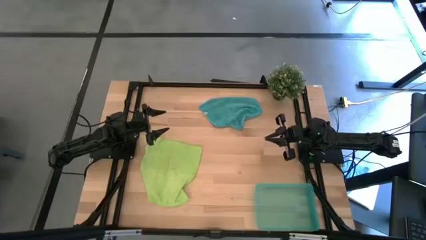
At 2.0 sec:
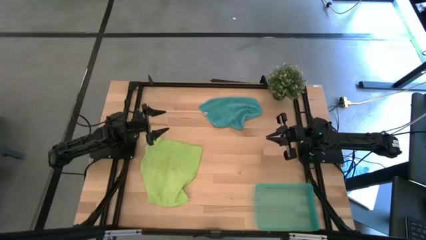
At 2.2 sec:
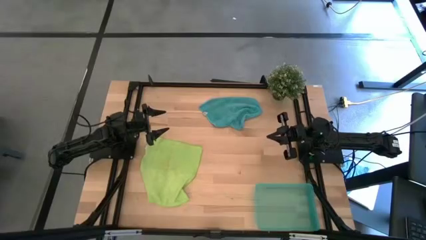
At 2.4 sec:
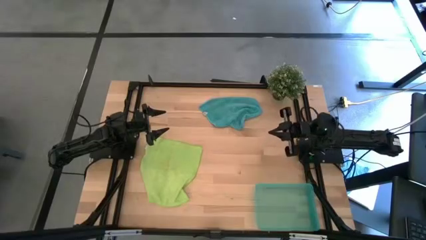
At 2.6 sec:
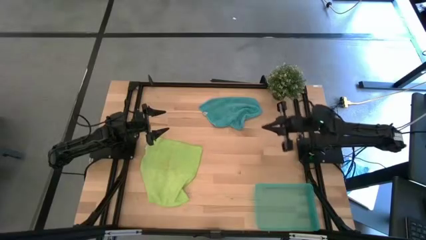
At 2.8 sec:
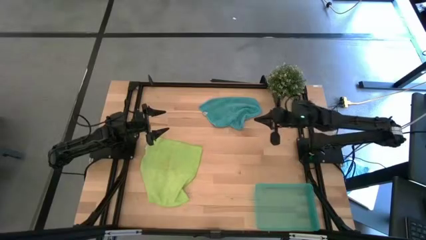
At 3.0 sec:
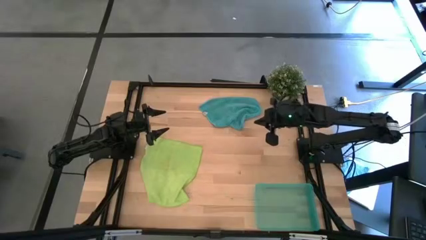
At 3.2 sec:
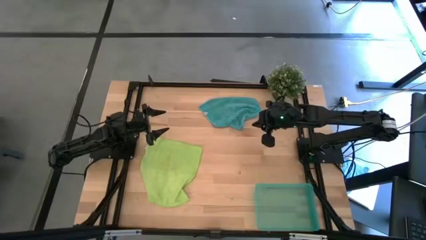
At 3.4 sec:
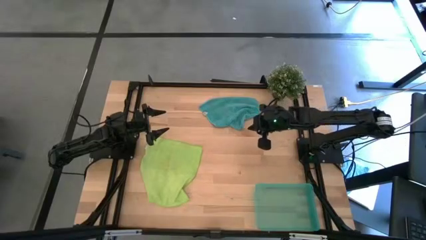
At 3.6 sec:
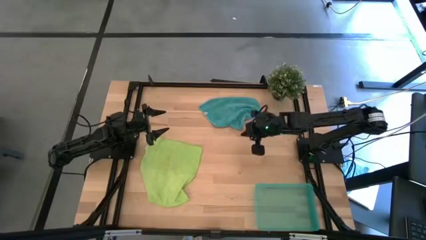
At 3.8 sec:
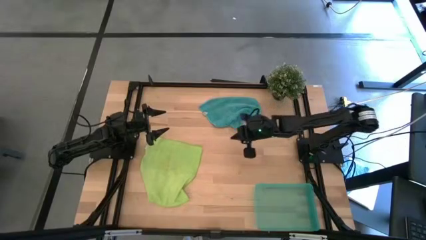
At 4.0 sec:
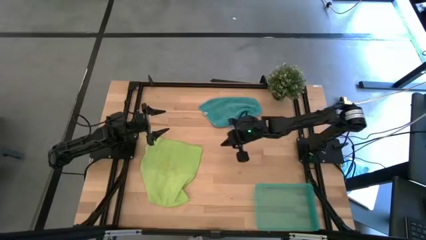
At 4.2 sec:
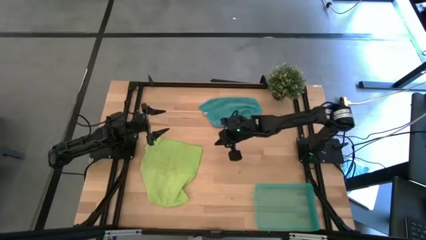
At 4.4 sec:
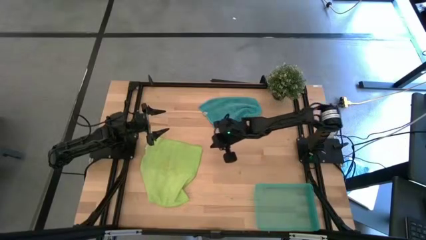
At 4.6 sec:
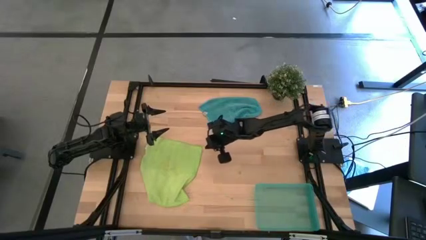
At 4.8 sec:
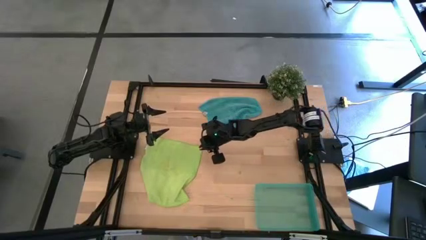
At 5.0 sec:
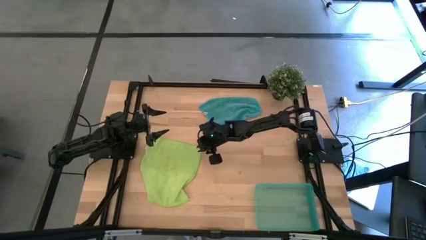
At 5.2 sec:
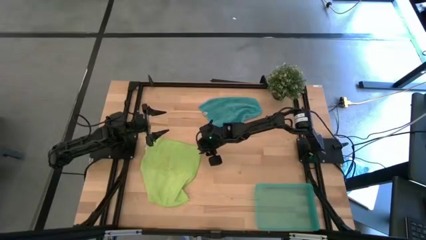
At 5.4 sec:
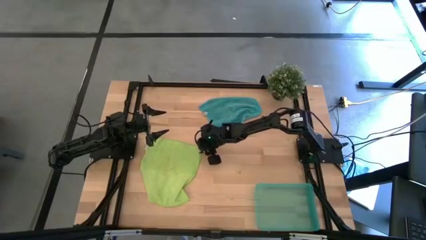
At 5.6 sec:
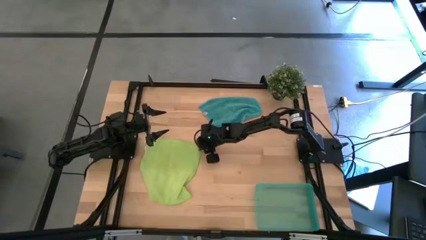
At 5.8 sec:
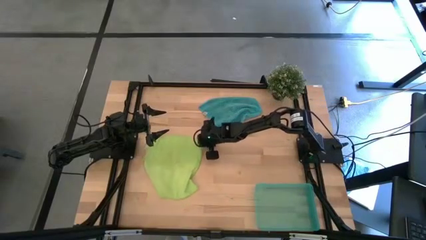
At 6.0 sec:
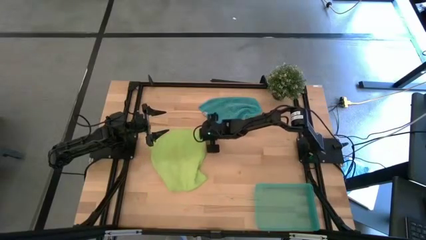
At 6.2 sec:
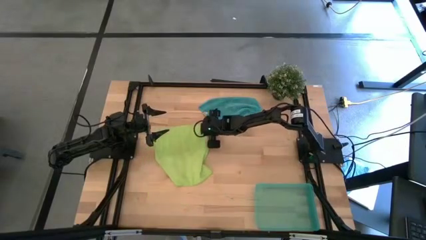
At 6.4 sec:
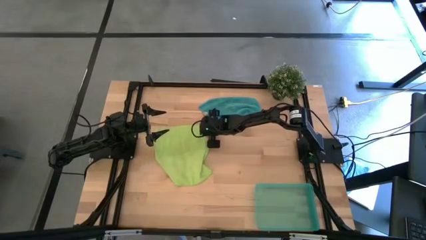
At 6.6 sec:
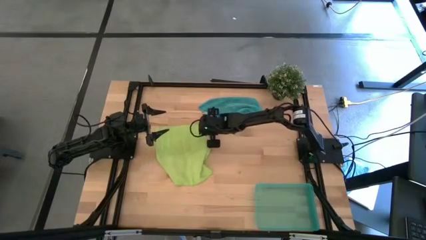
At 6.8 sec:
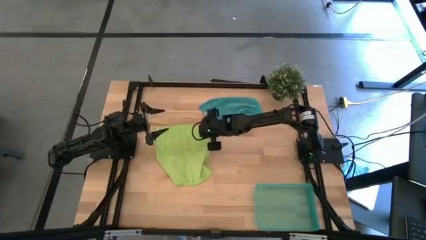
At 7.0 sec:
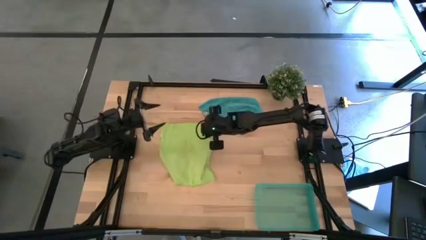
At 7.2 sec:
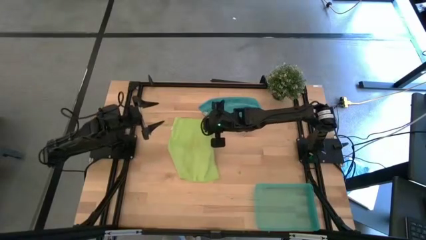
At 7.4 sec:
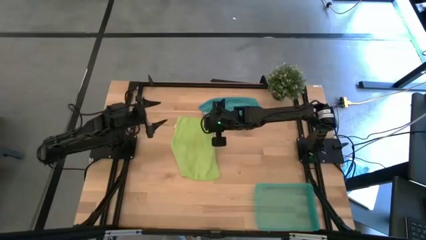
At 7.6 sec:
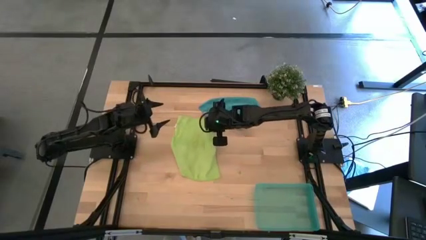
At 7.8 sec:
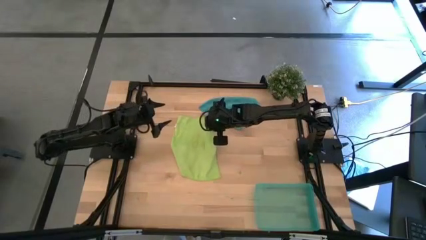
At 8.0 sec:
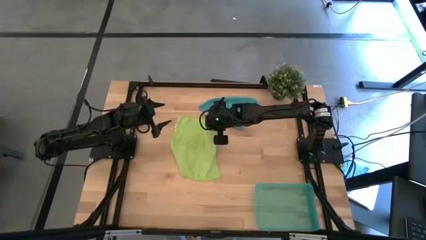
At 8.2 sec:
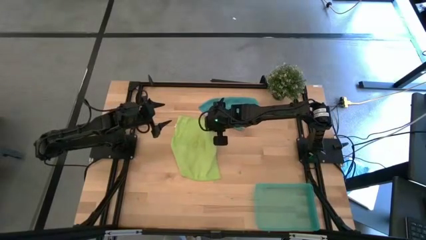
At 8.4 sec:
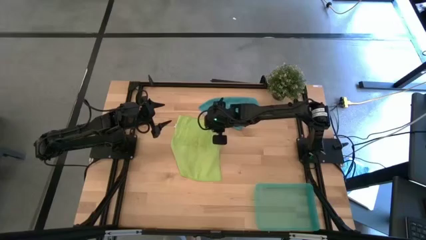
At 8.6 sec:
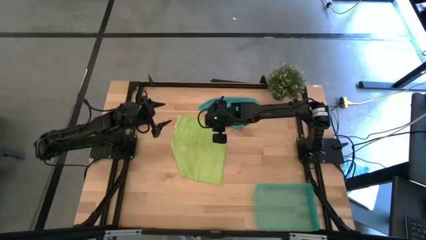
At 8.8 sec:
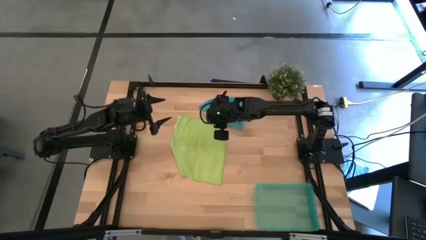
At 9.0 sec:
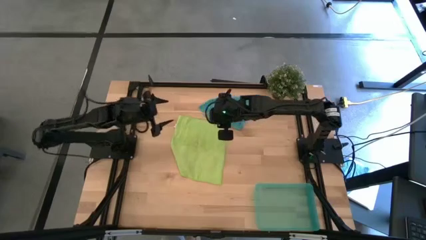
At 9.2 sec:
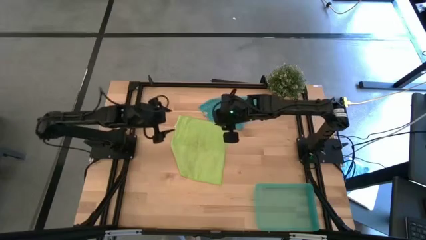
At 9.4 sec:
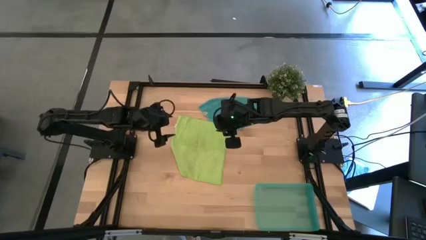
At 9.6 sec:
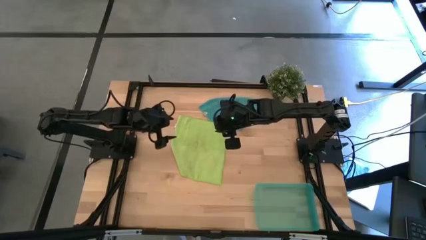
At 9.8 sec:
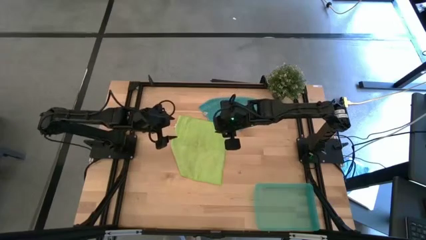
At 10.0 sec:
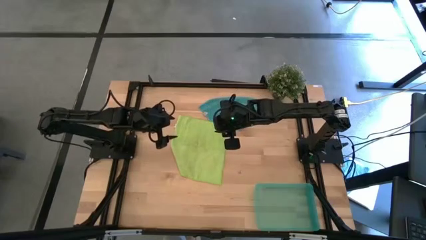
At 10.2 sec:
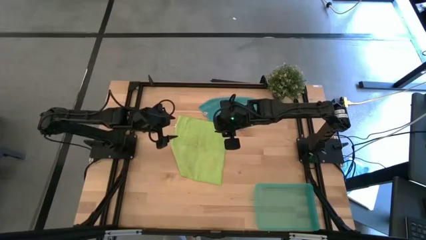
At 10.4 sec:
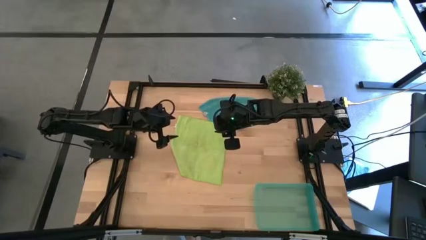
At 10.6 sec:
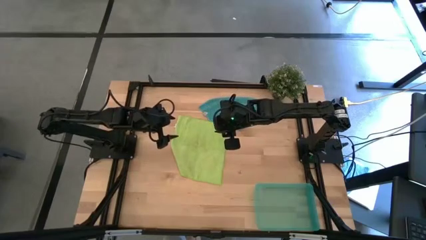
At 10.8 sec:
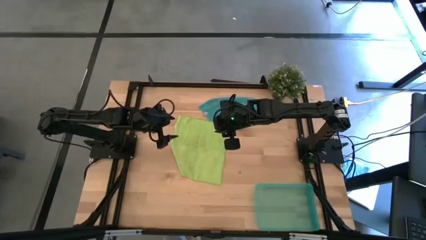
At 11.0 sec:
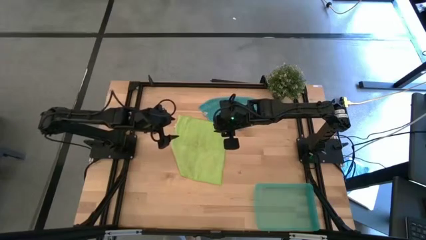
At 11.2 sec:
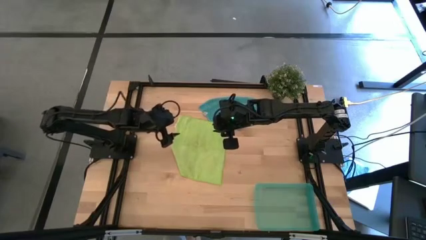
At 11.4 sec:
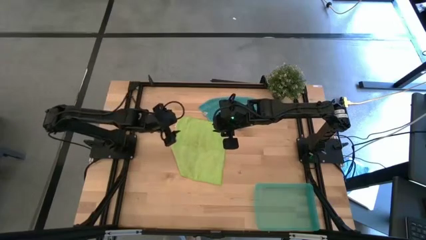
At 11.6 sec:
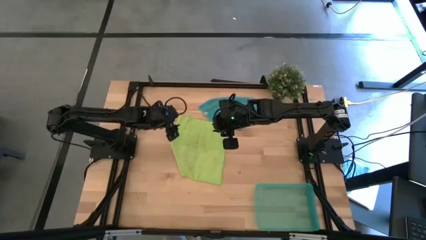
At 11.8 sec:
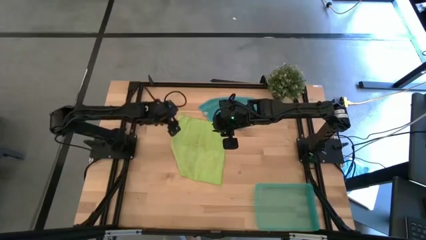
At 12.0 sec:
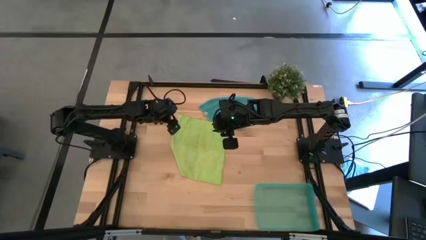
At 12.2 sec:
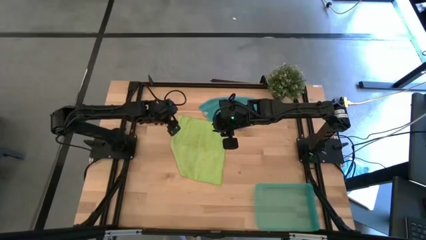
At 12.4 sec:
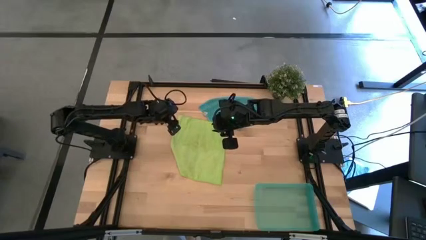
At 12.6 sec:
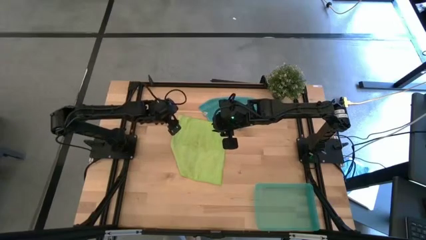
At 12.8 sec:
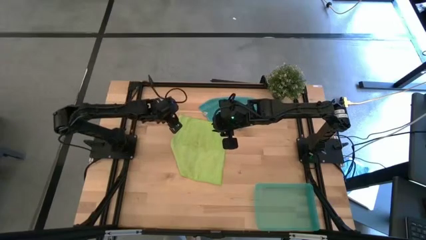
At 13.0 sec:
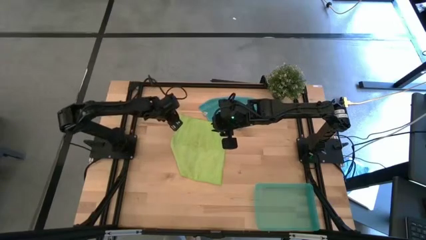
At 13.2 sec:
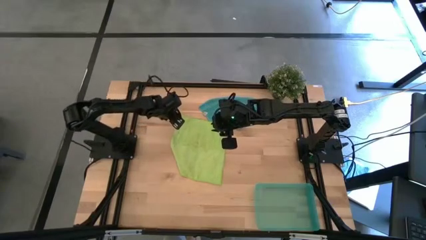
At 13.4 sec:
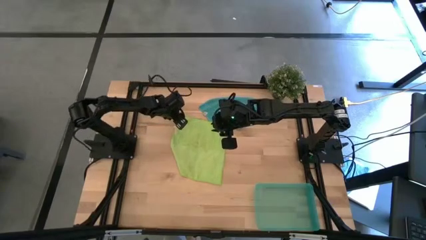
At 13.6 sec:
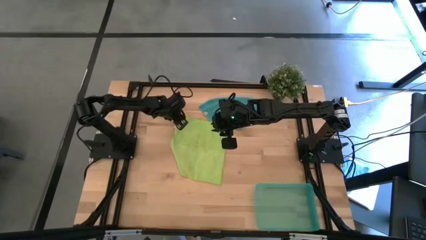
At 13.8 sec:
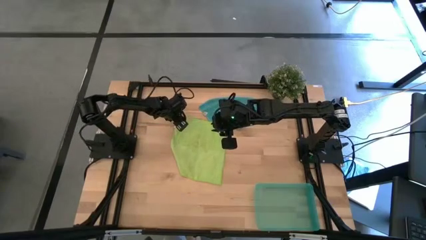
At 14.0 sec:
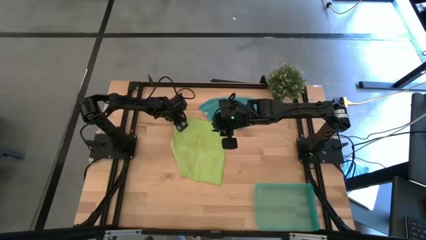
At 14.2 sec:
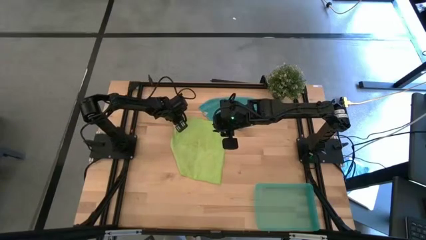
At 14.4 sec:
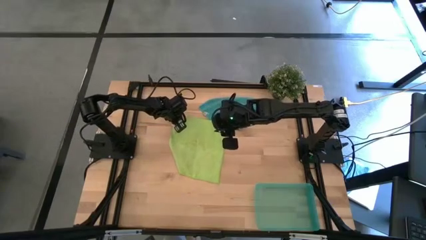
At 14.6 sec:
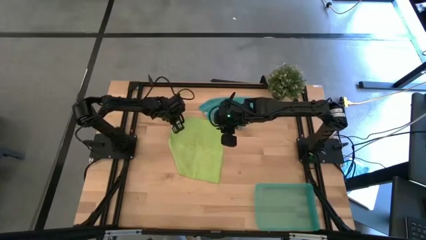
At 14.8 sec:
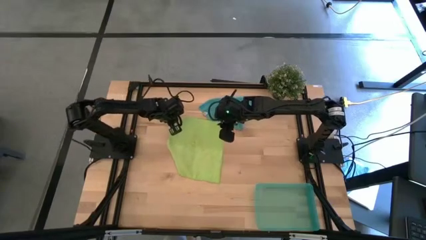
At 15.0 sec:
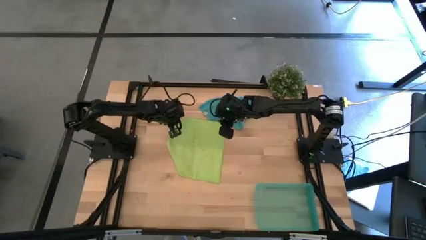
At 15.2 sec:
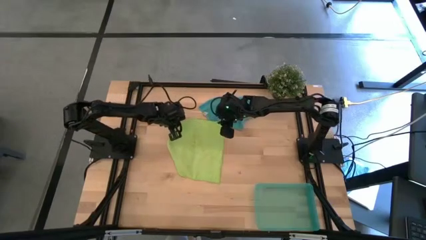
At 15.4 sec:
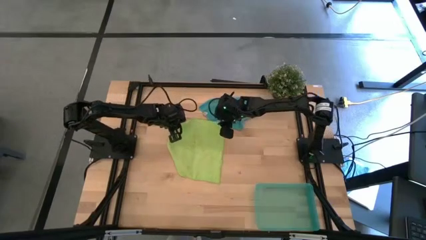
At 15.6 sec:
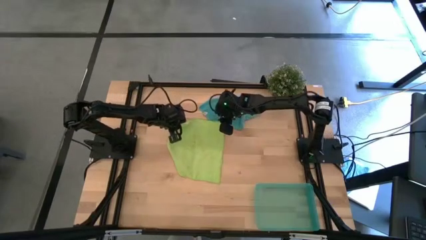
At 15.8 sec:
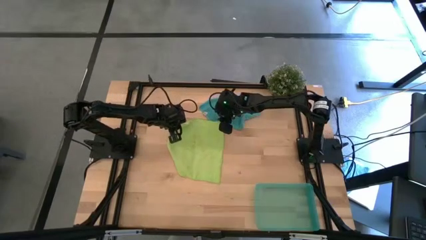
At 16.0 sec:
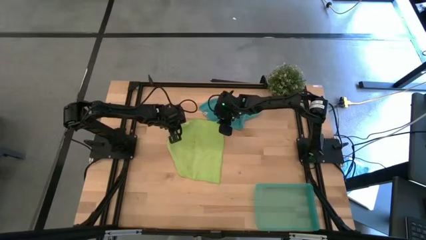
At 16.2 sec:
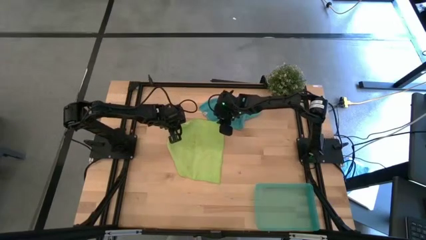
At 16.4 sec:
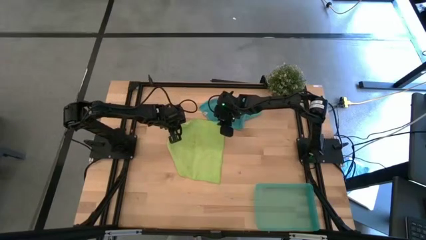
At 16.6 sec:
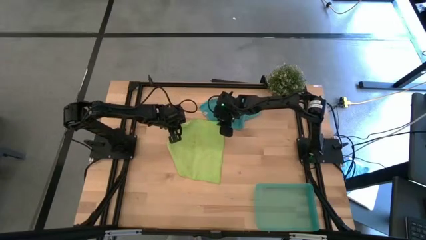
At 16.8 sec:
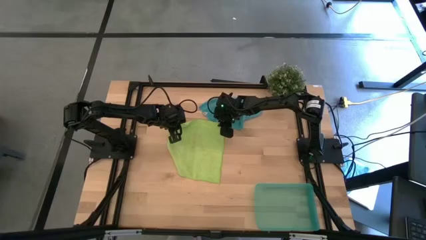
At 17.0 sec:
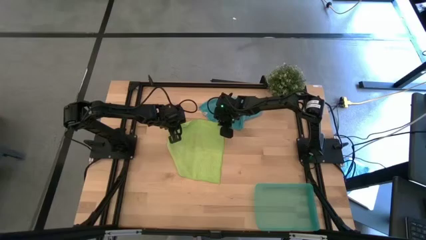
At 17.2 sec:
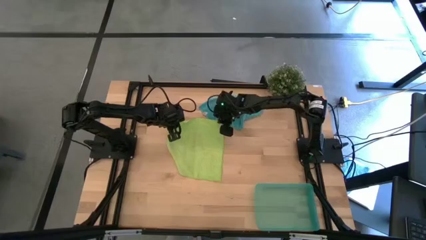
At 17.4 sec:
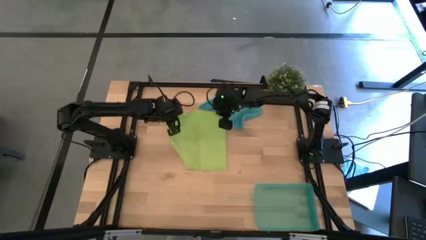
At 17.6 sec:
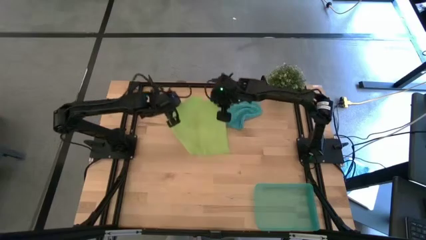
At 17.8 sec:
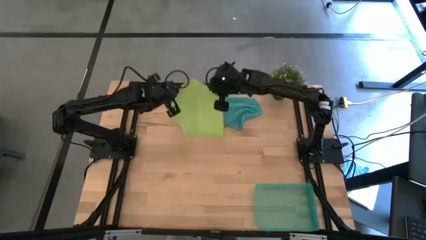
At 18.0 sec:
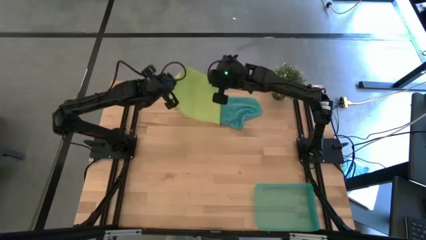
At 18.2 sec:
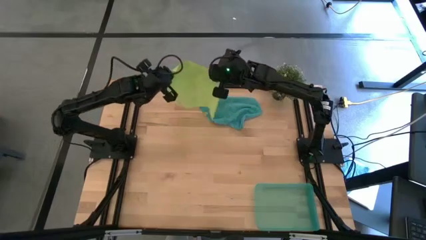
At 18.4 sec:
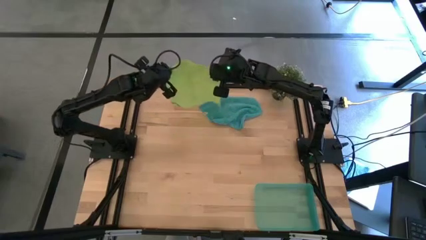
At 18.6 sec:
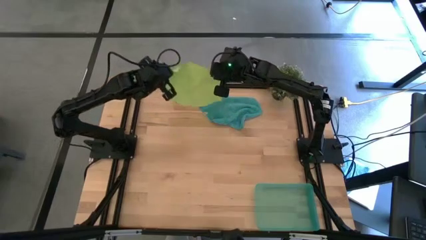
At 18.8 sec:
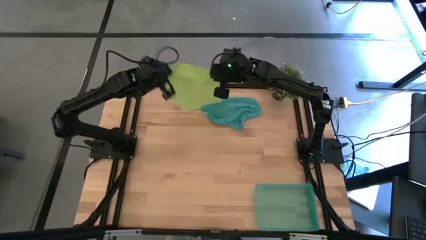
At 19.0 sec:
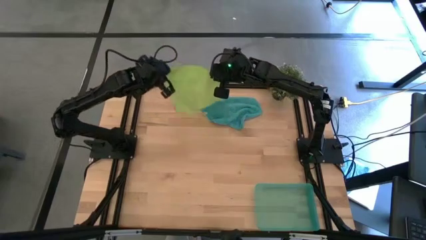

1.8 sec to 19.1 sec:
Task: Roll microfiber towels into tight, uniform cylinder then place into a basket
Fold the green microfiber cloth
